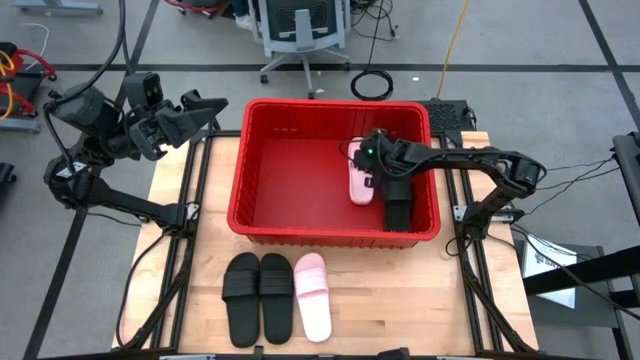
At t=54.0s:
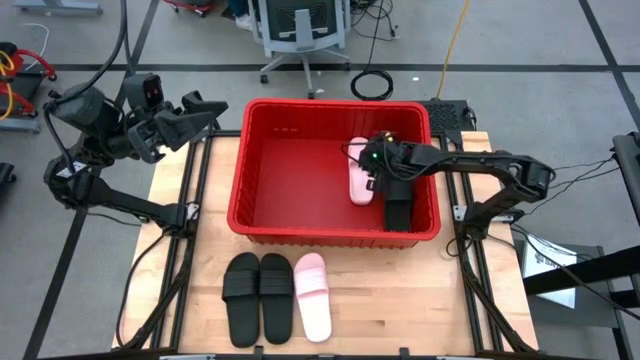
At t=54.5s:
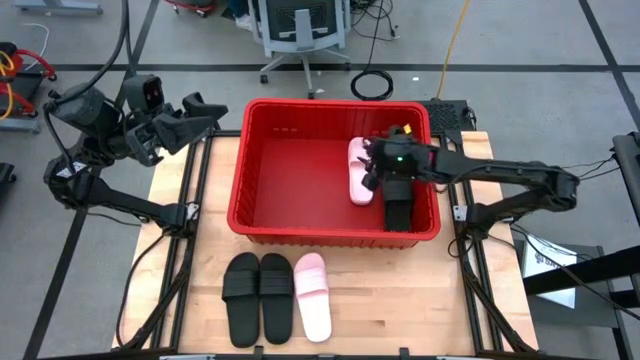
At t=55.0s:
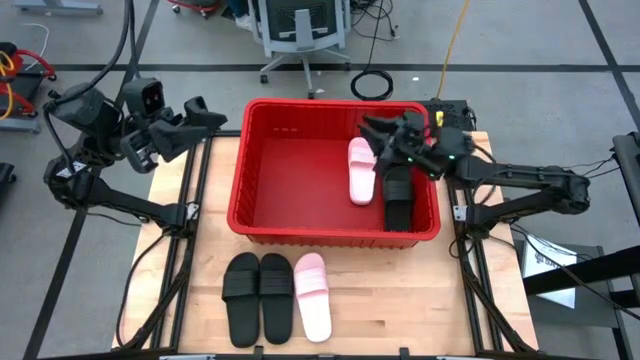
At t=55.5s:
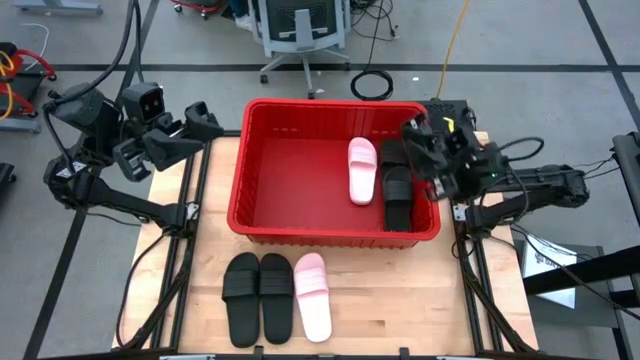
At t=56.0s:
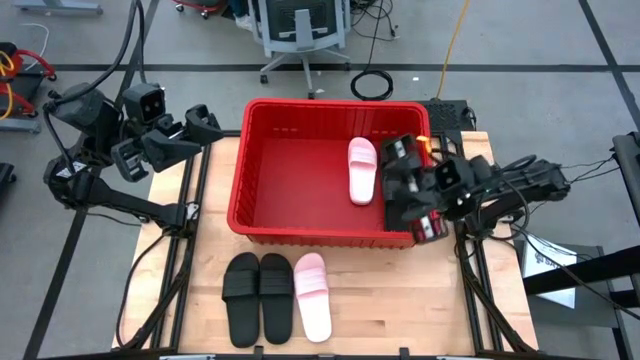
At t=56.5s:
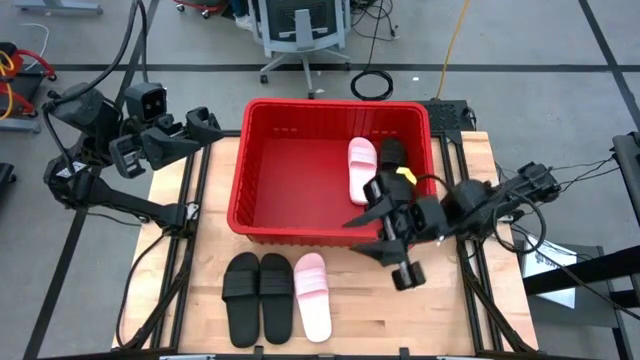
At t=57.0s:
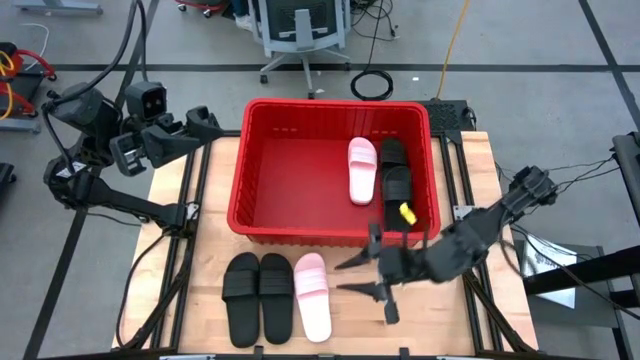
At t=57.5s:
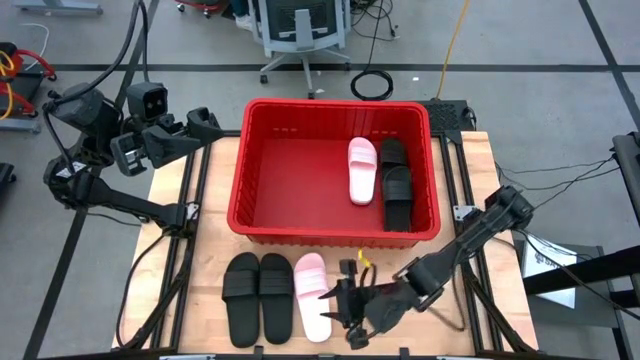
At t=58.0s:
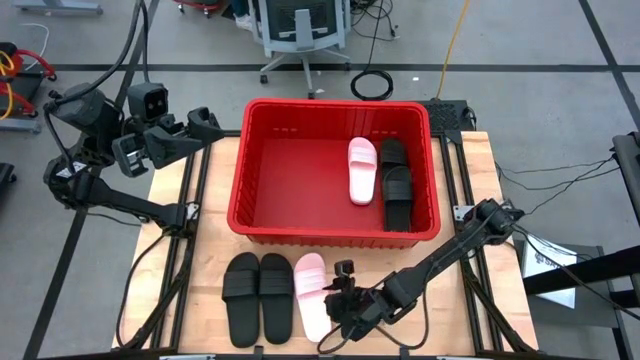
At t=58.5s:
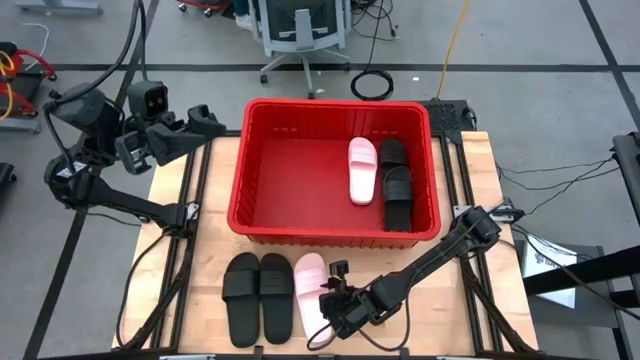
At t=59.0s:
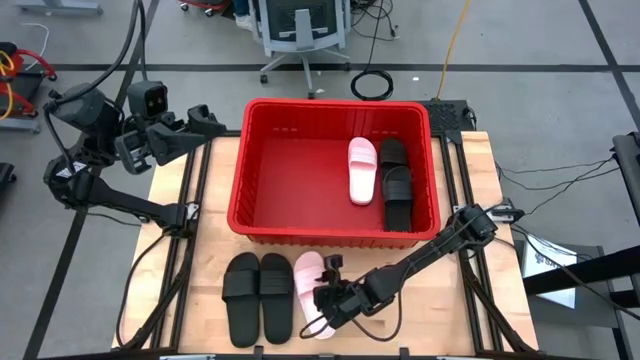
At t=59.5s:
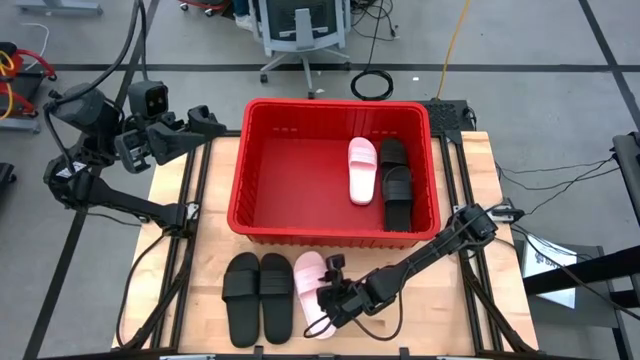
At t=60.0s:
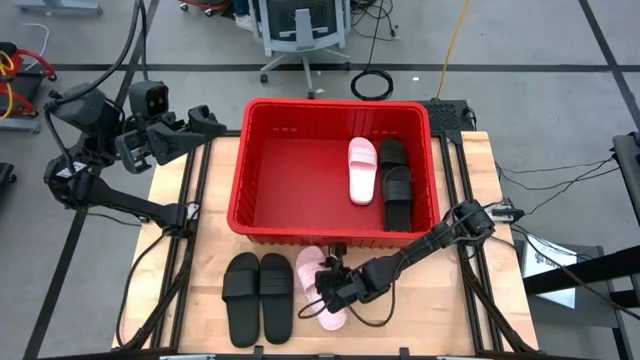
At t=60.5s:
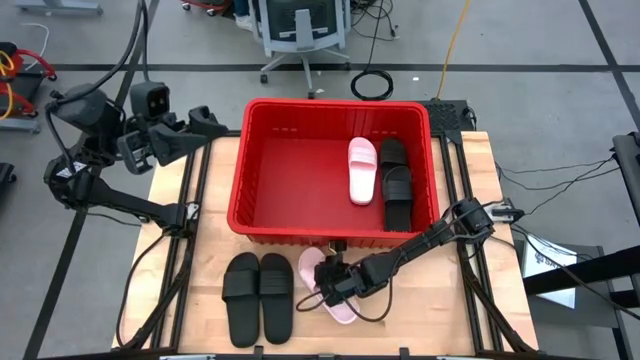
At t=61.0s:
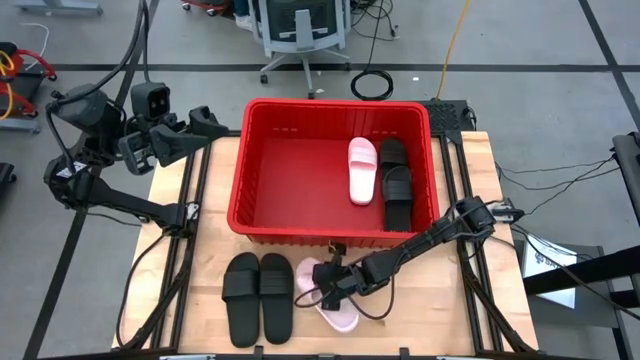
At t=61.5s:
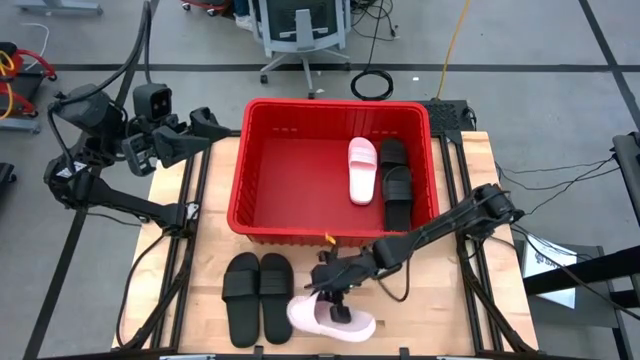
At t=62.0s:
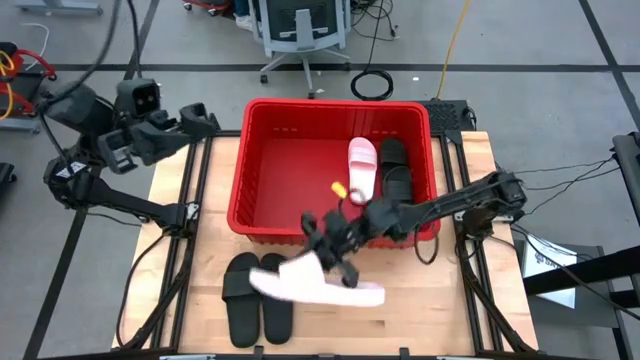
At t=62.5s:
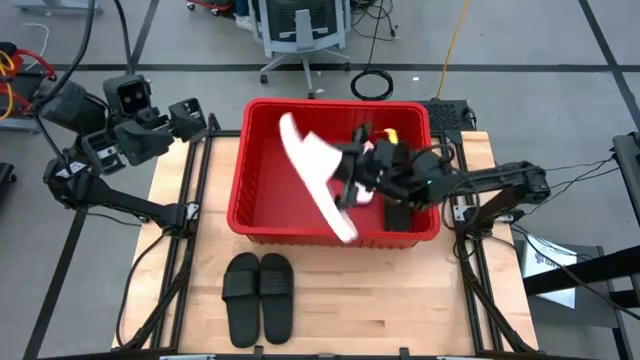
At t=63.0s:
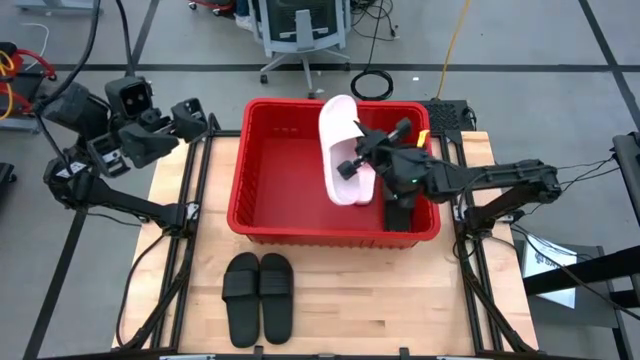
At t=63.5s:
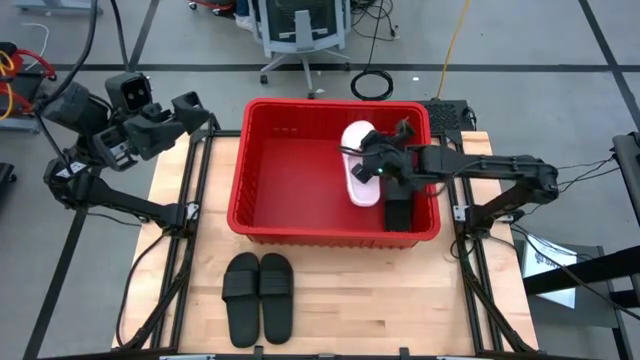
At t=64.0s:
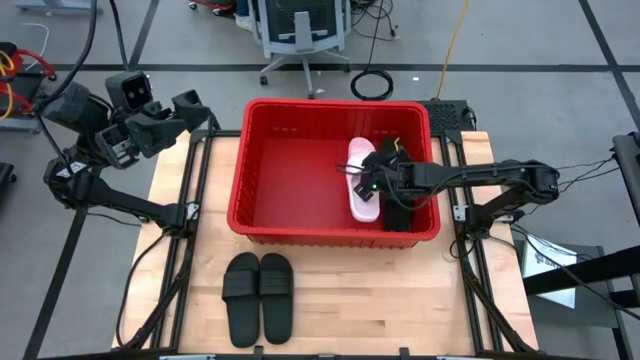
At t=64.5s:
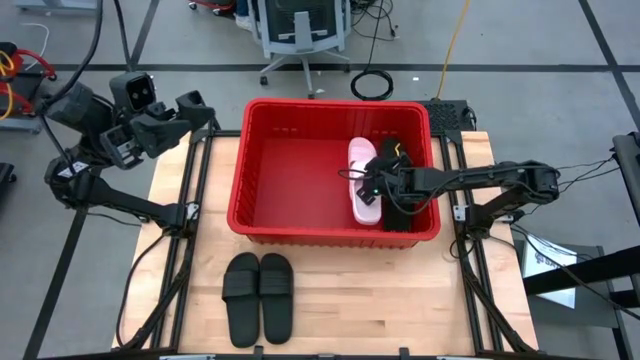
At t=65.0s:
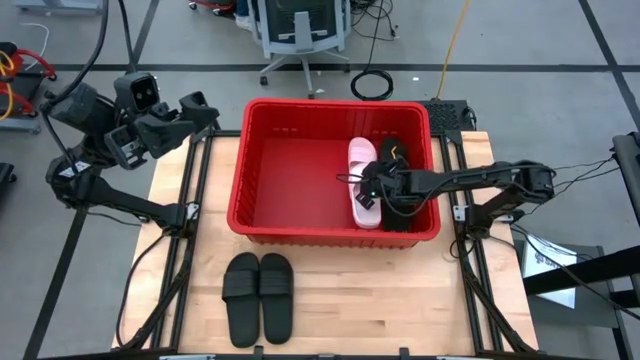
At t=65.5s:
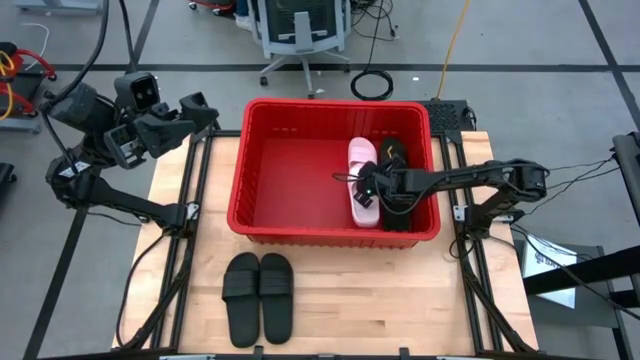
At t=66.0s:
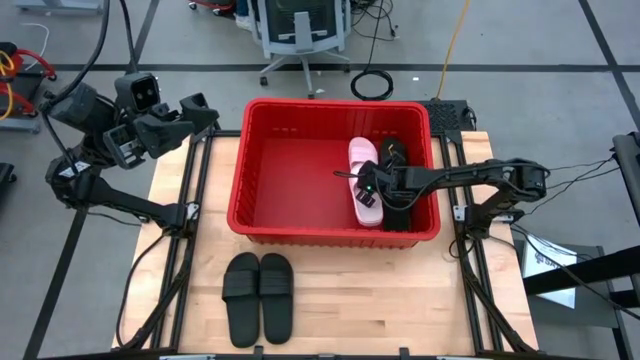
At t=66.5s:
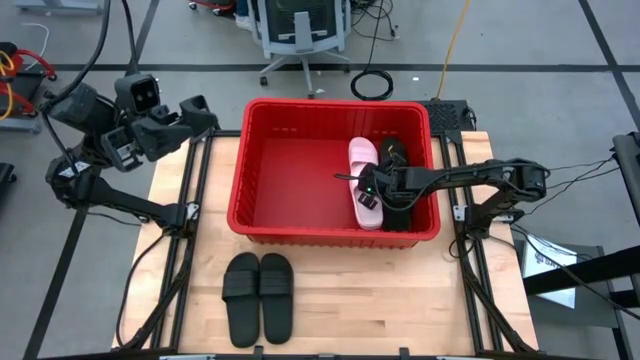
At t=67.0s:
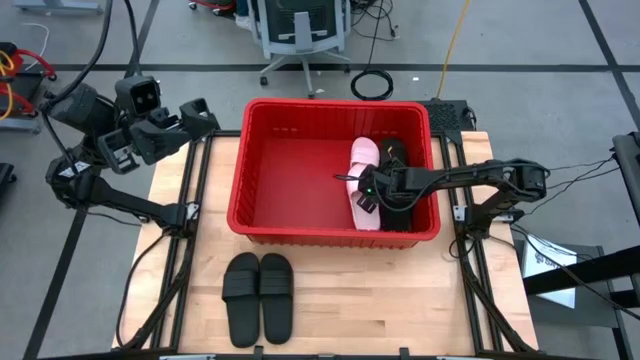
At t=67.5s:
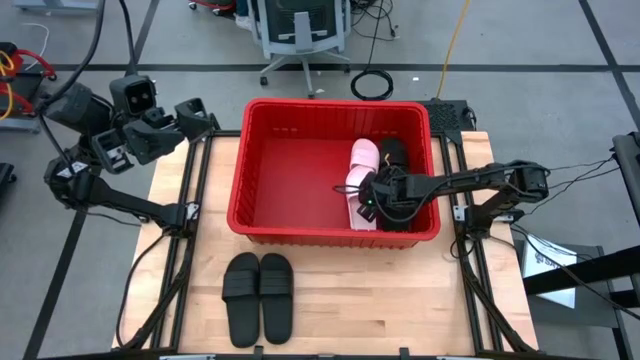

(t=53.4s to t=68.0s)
Task: Pick and place slides into bin
Put the pink slide into the red bin

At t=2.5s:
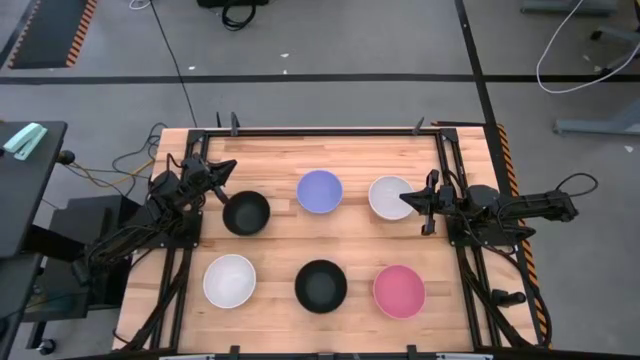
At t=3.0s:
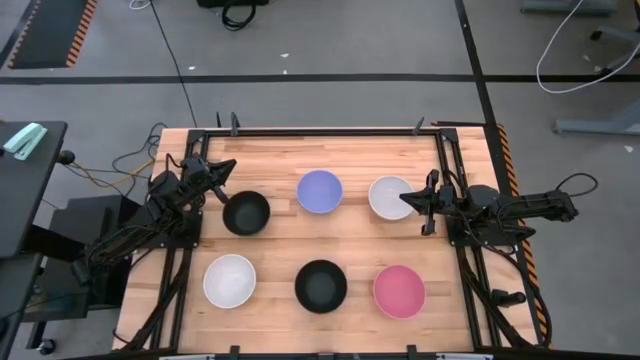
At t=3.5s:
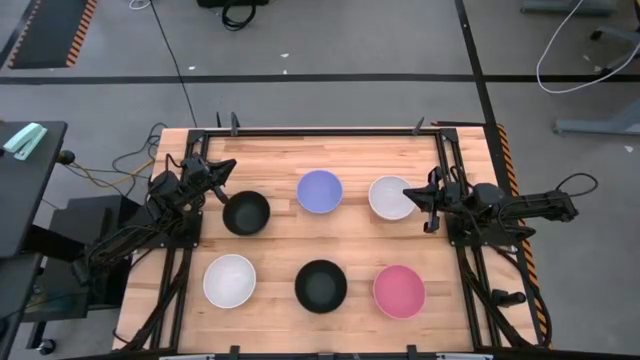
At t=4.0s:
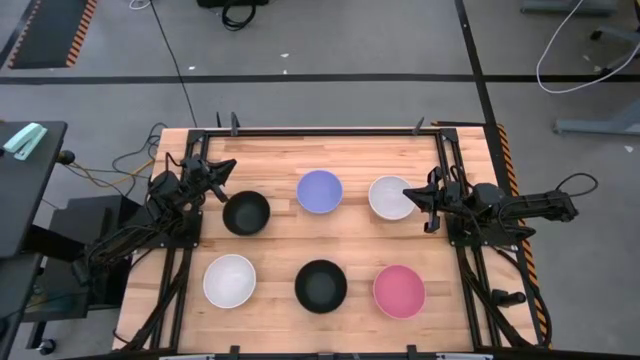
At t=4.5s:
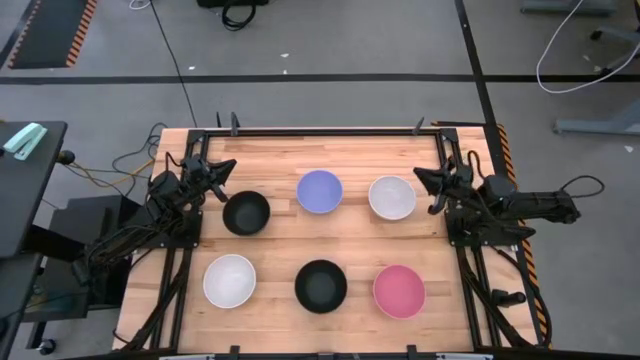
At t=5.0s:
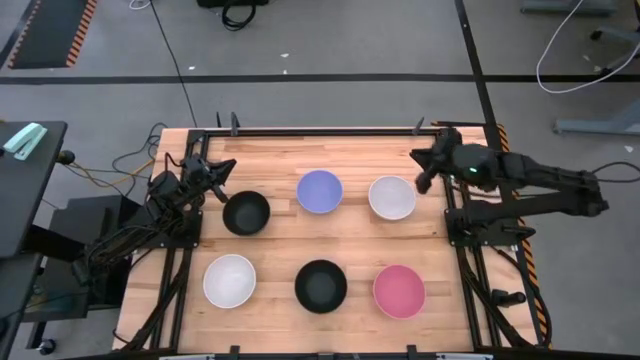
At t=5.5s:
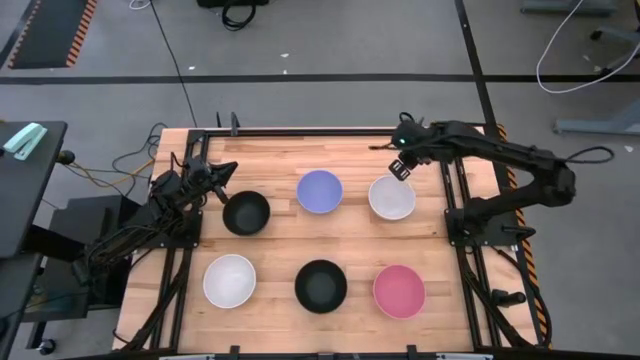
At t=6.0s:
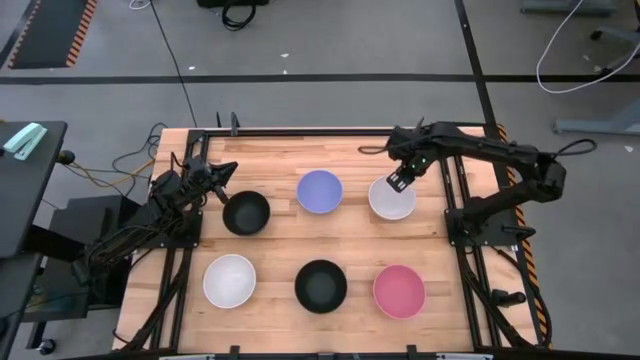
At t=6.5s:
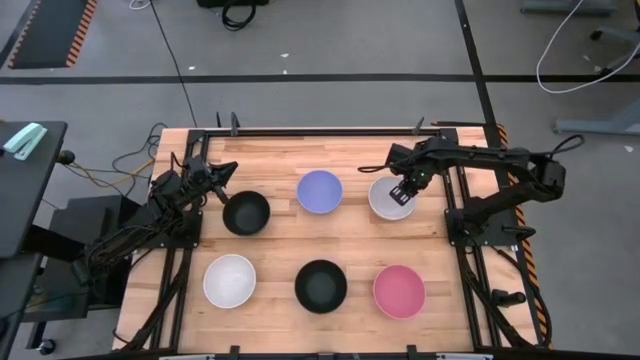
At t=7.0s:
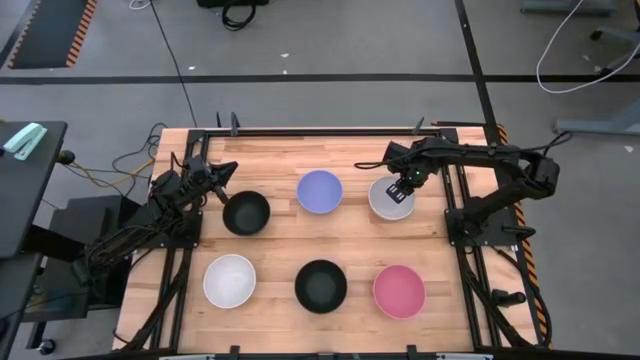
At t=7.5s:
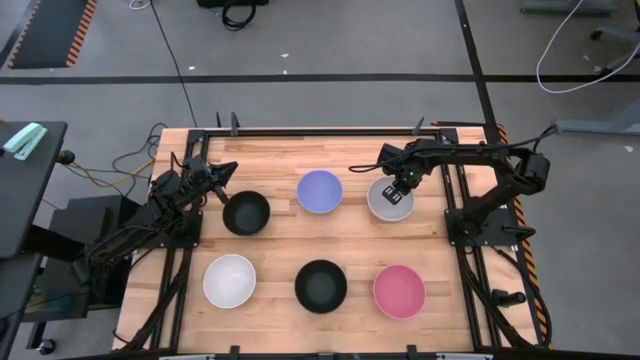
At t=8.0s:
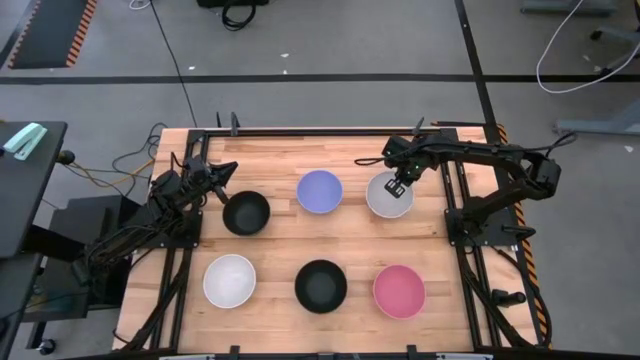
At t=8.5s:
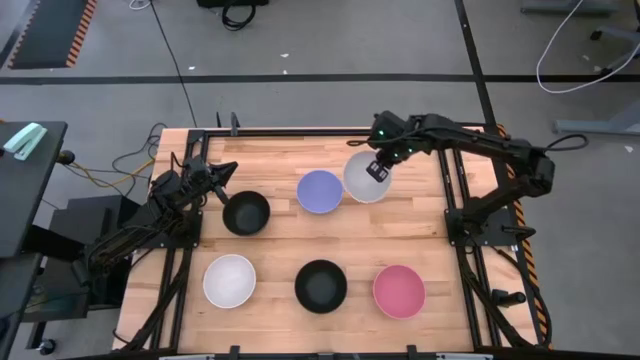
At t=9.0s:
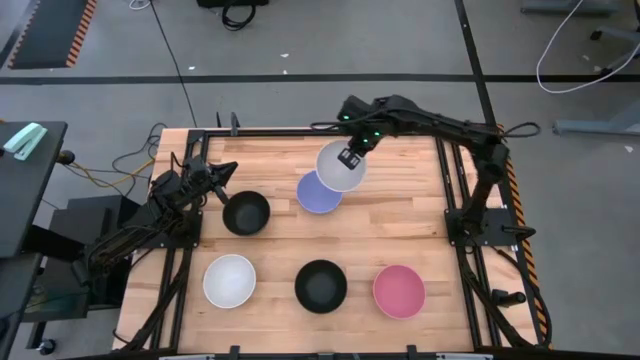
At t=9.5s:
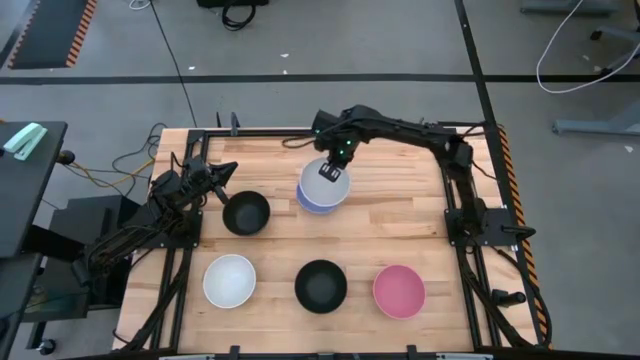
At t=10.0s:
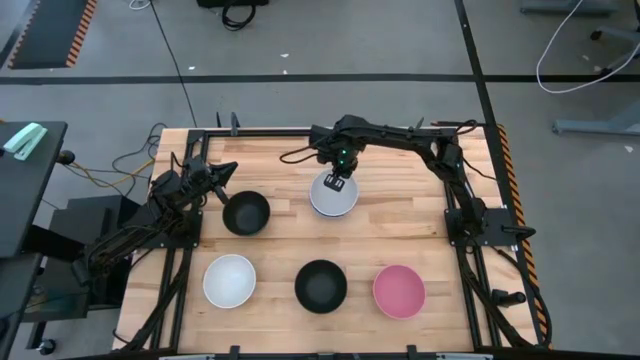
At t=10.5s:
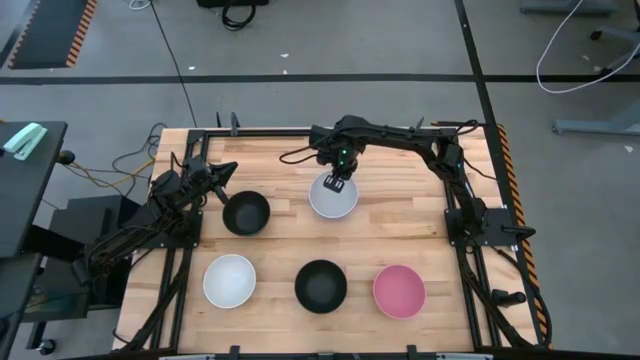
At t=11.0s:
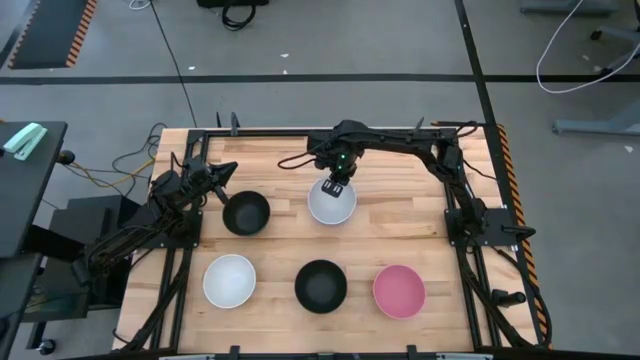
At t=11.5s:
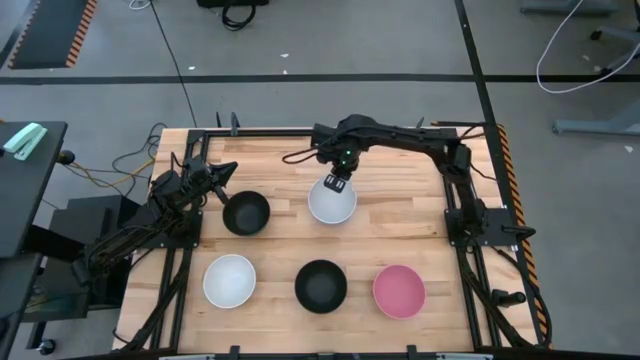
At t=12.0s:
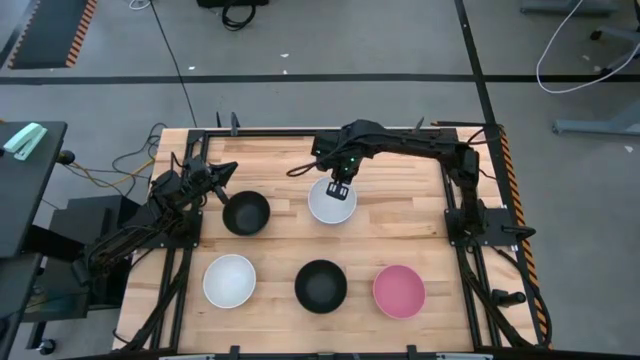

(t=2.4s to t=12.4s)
Task: Nest bowls inside each other
Stack the top white bowl on top of the purple bowl
